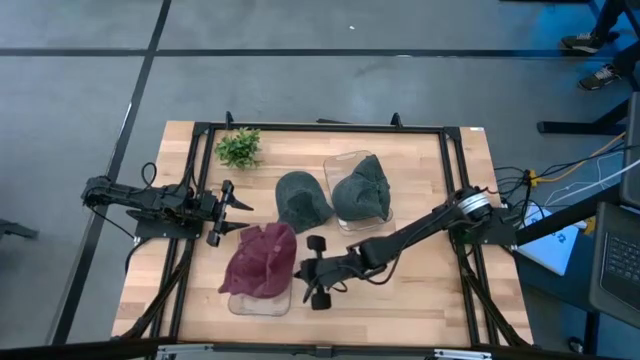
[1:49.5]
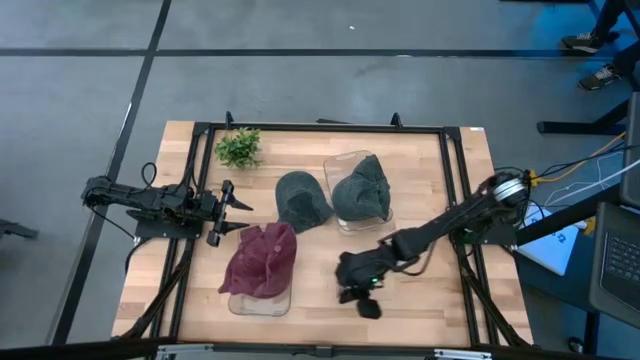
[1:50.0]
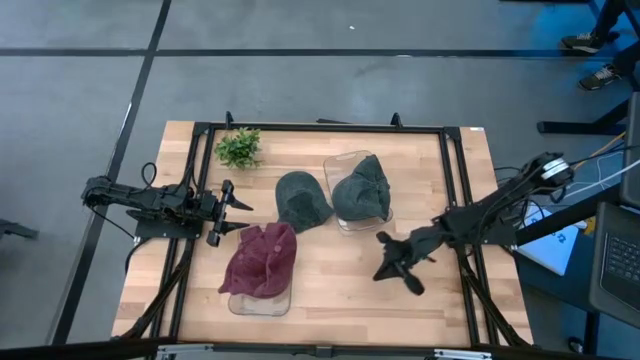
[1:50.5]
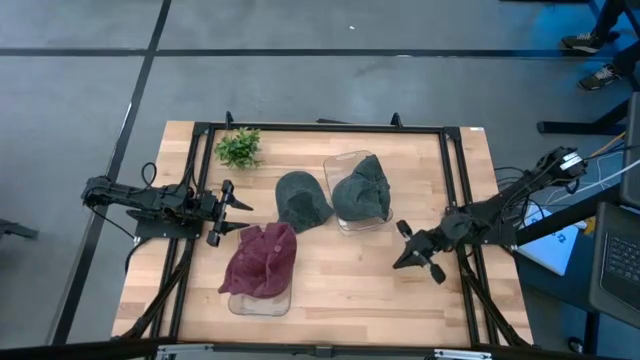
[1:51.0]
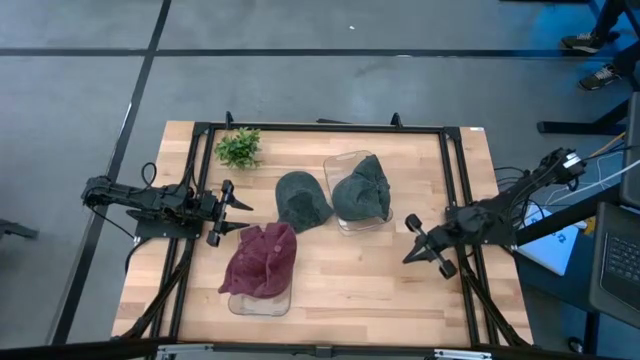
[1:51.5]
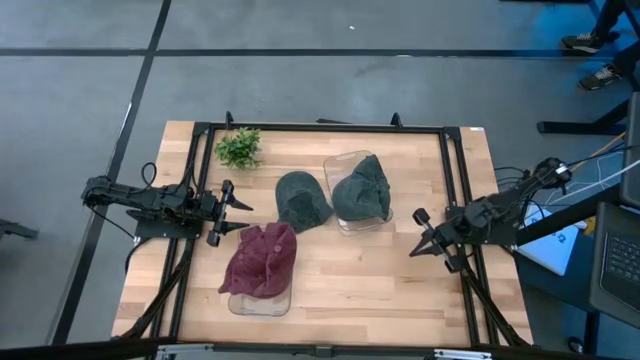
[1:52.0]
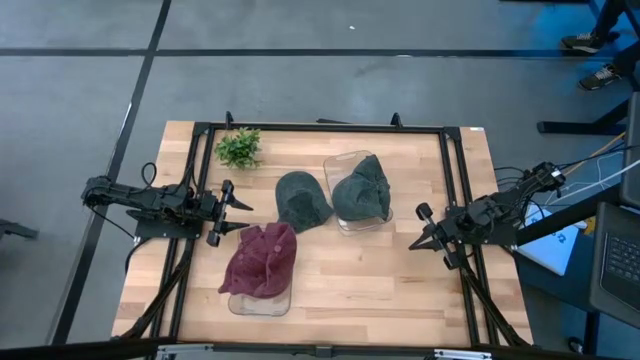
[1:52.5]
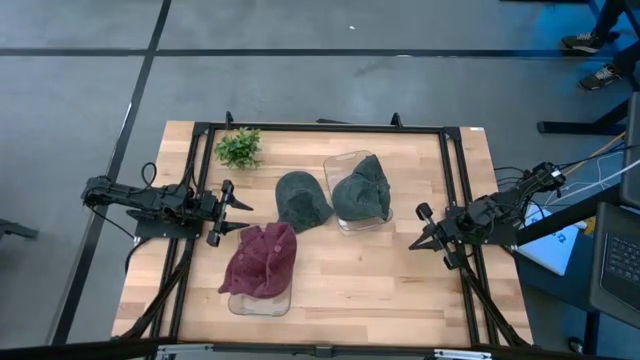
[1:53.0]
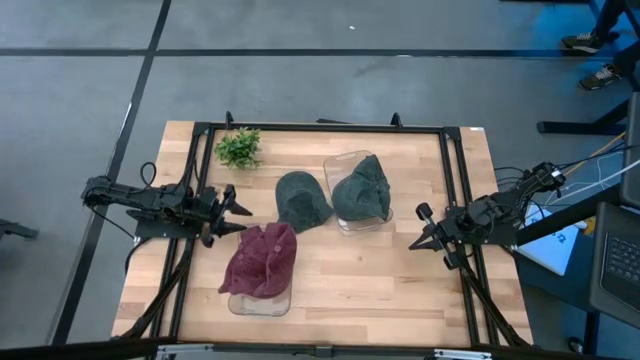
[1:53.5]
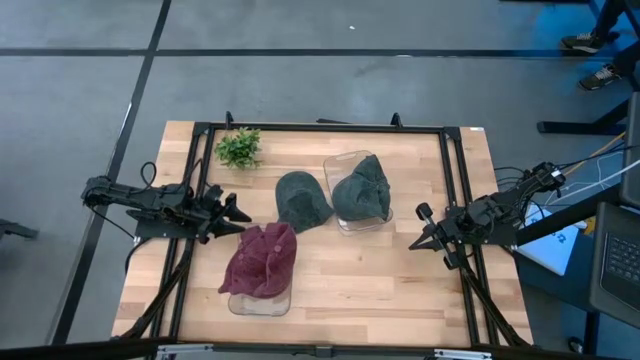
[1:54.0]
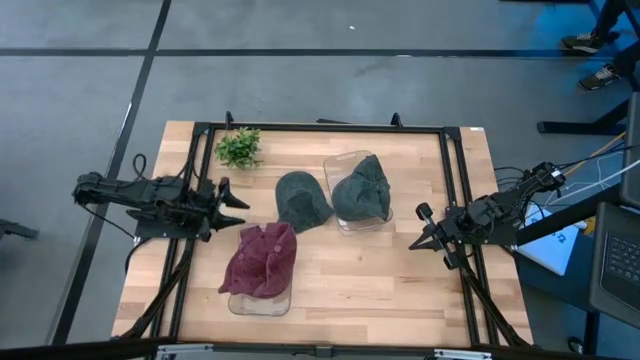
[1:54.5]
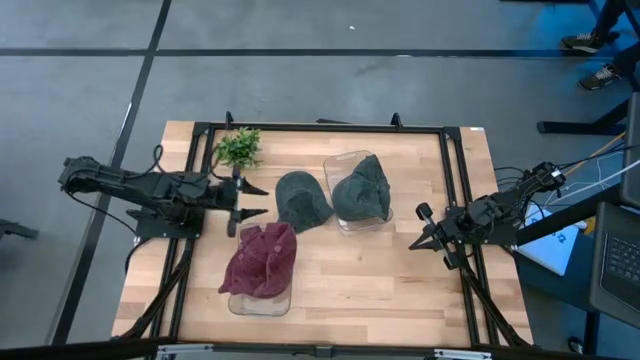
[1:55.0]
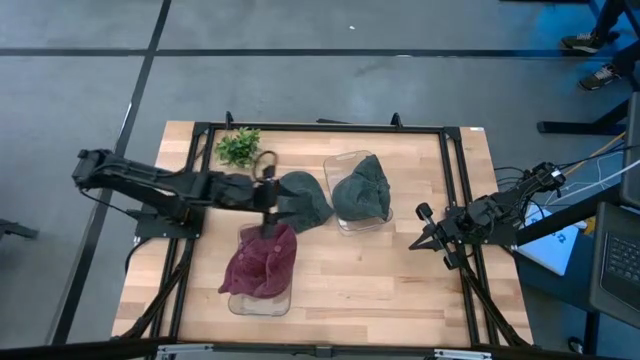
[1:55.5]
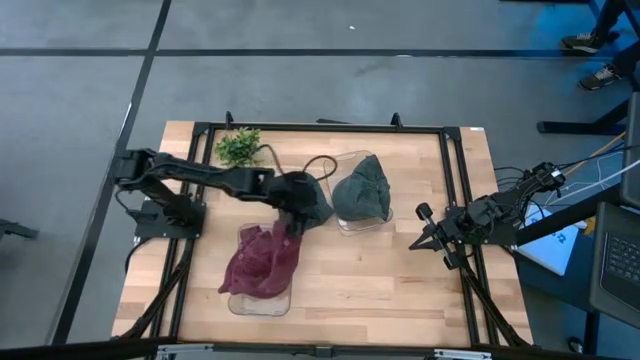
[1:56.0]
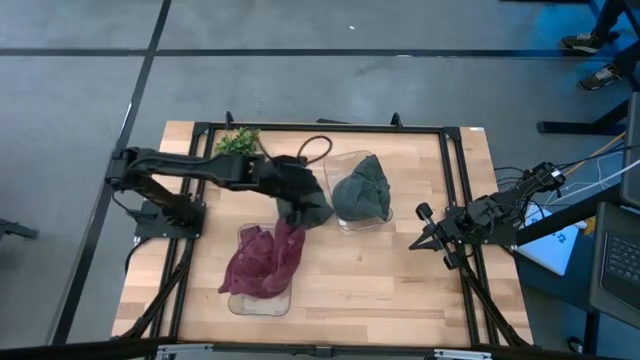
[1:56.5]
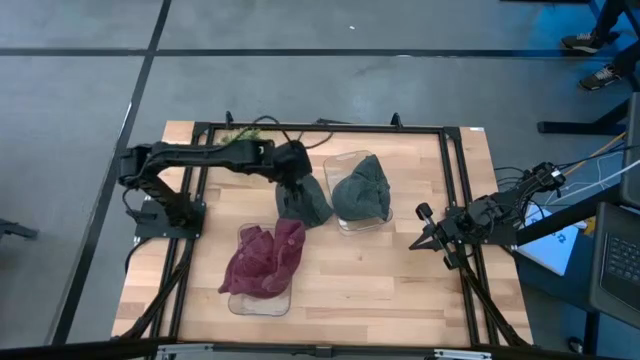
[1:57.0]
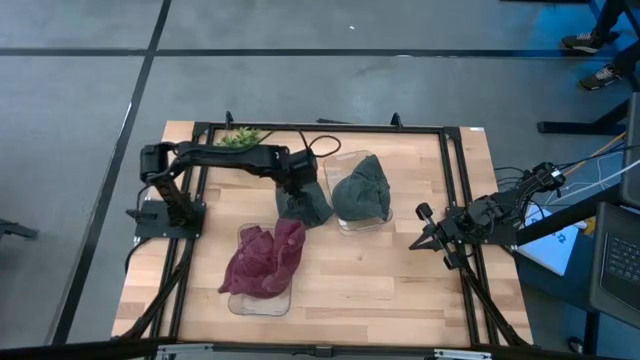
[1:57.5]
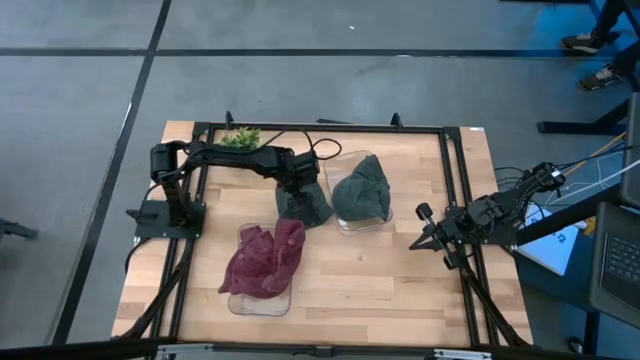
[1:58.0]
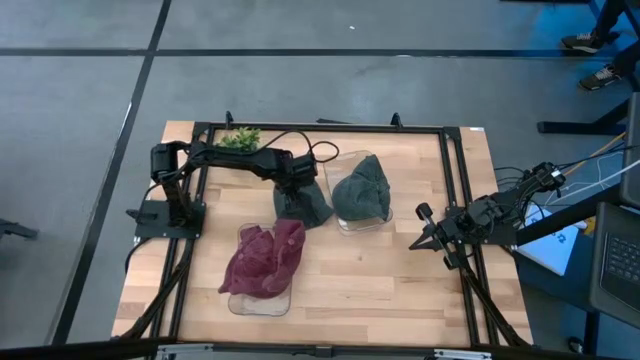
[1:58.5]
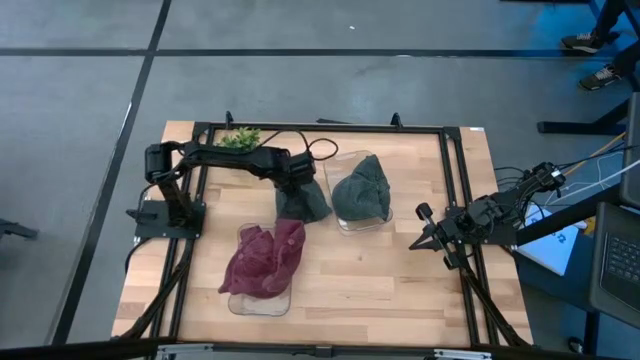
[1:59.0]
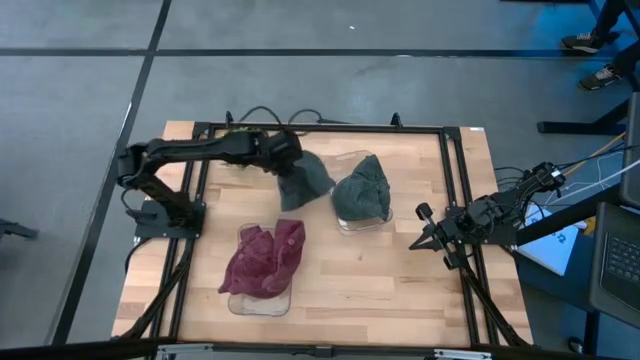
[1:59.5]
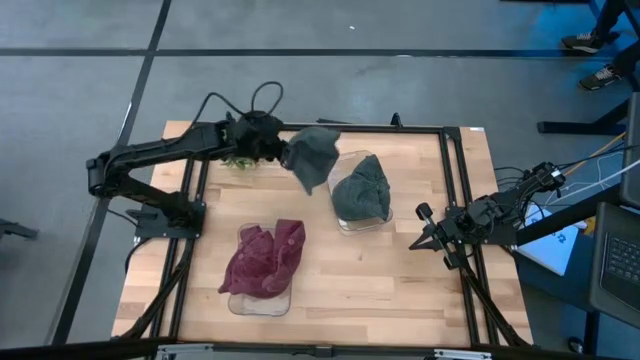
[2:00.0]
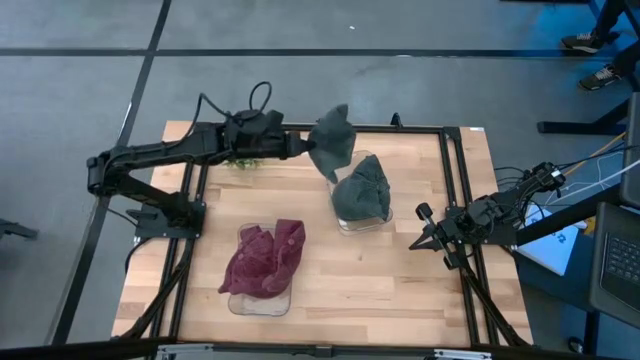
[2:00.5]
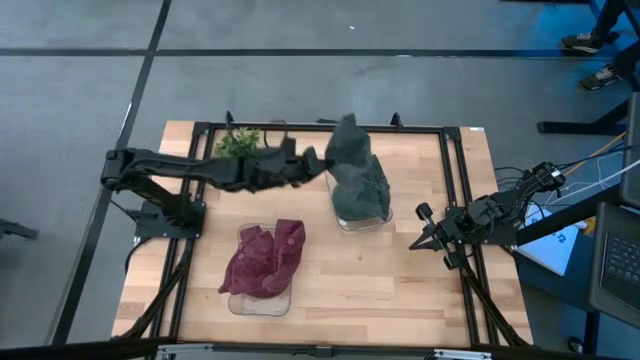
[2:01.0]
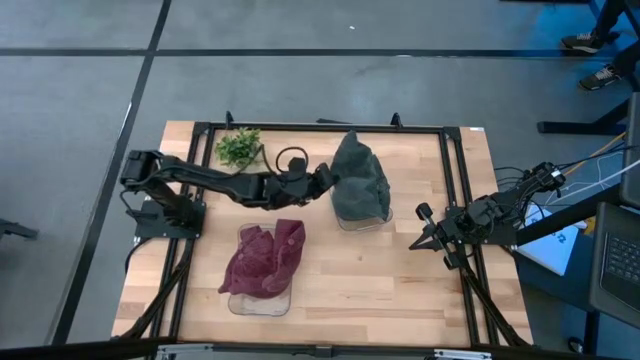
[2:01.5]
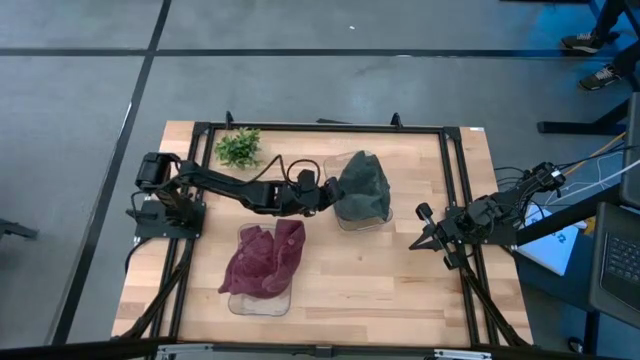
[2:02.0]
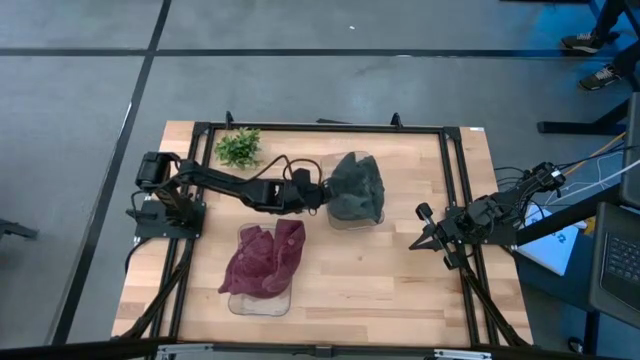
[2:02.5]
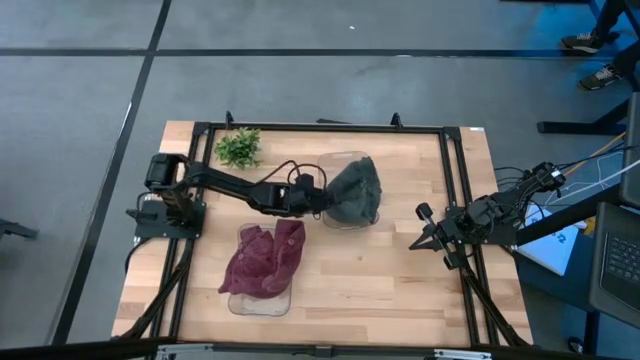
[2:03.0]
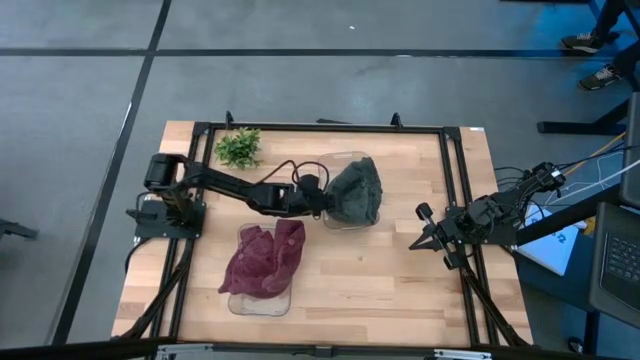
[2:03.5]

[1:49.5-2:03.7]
Task: Pick & Place hat
Put the black cap into the right transparent bin

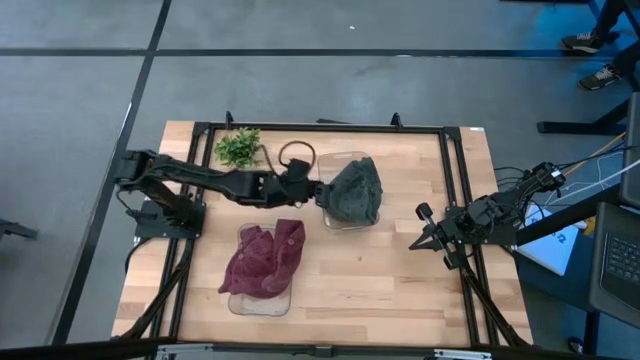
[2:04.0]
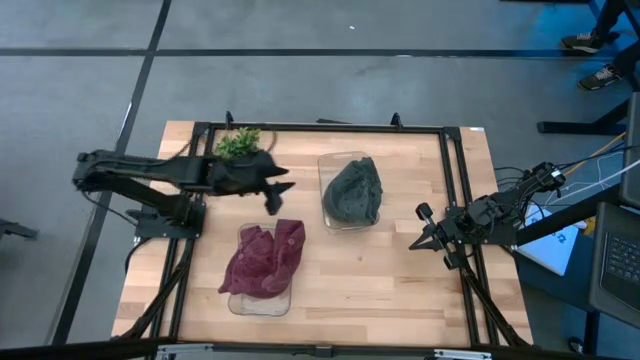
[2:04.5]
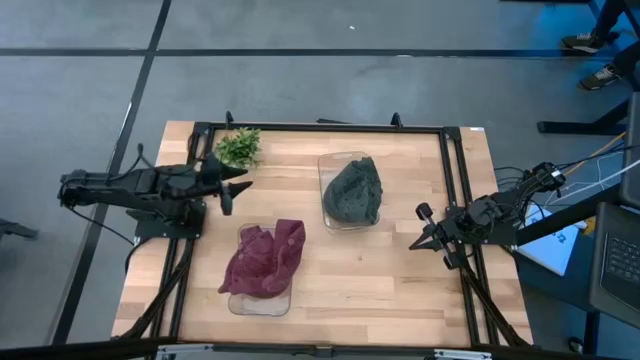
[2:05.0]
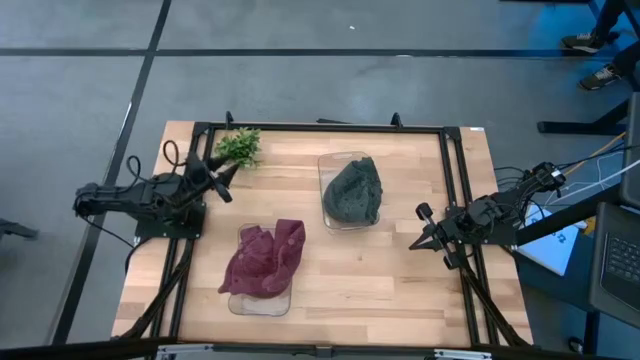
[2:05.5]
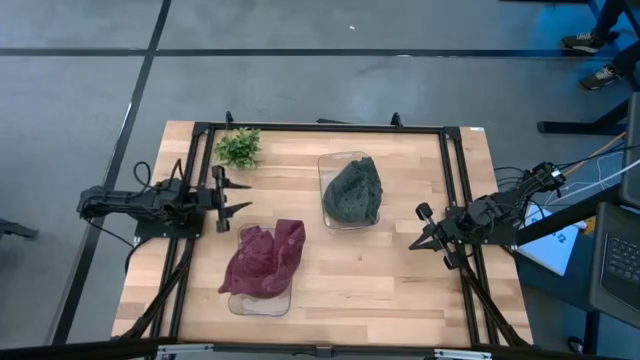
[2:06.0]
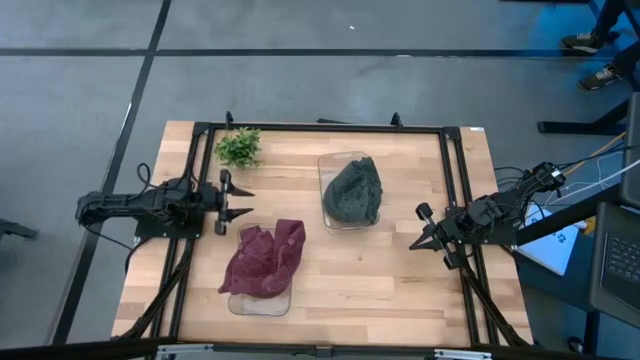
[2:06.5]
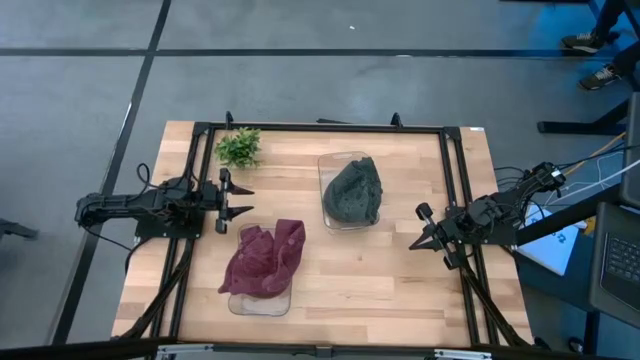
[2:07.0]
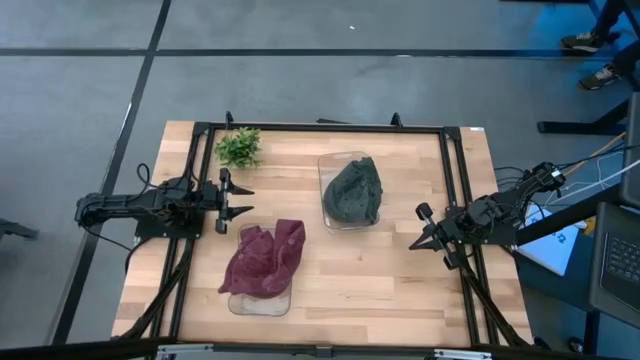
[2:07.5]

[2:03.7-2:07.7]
Return to Home Position

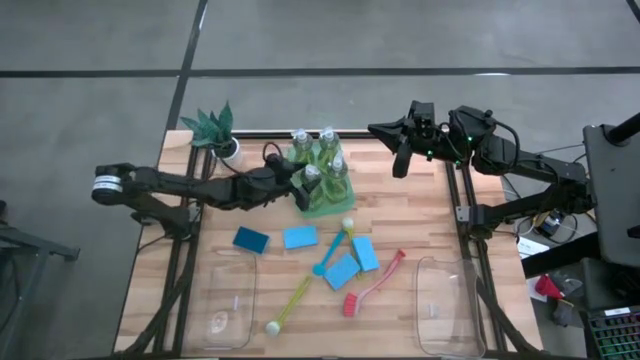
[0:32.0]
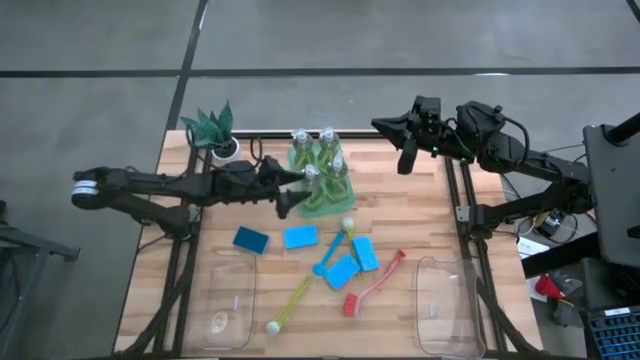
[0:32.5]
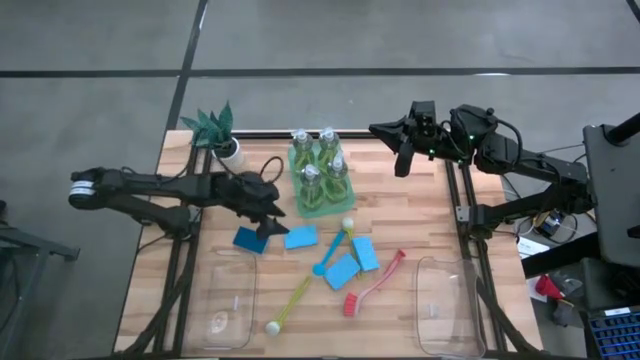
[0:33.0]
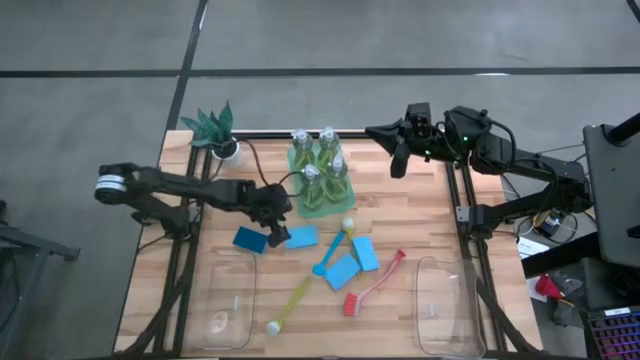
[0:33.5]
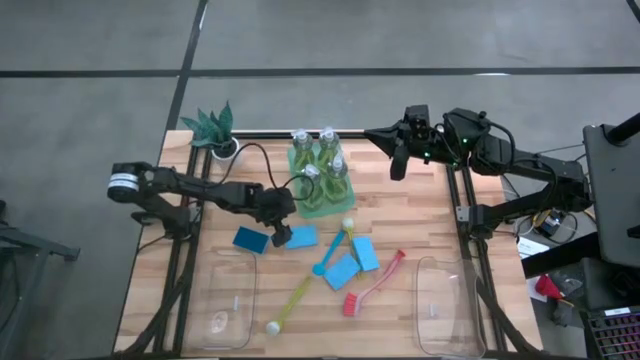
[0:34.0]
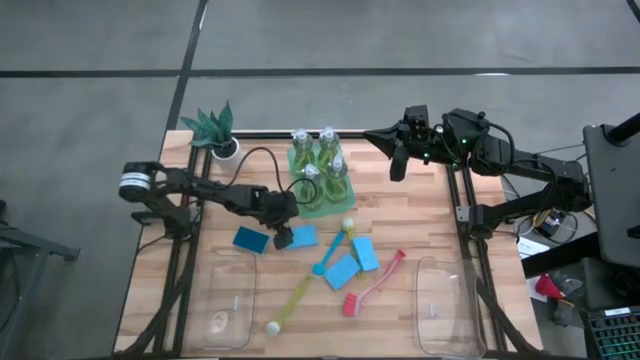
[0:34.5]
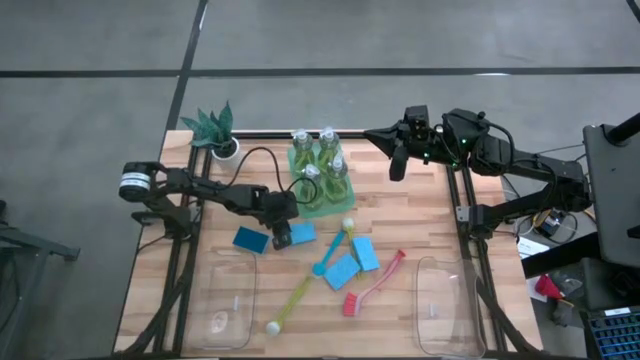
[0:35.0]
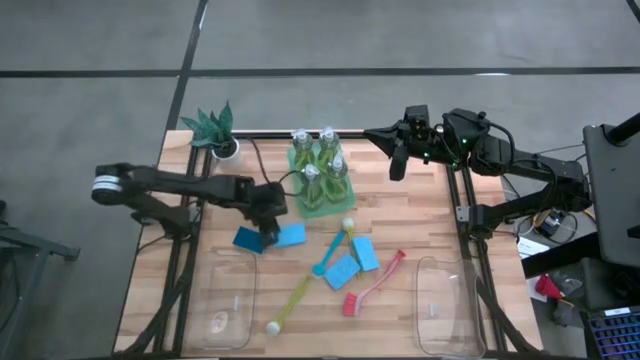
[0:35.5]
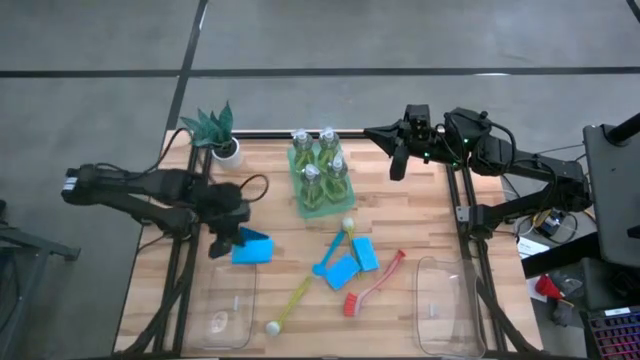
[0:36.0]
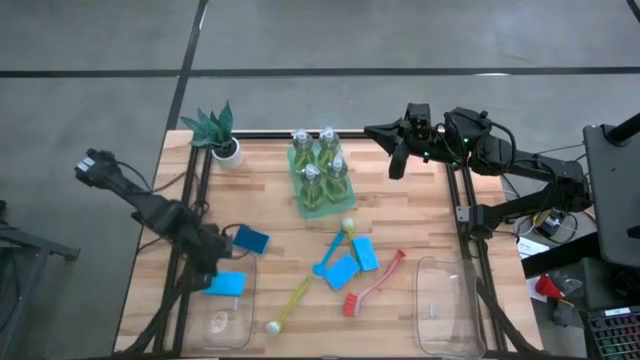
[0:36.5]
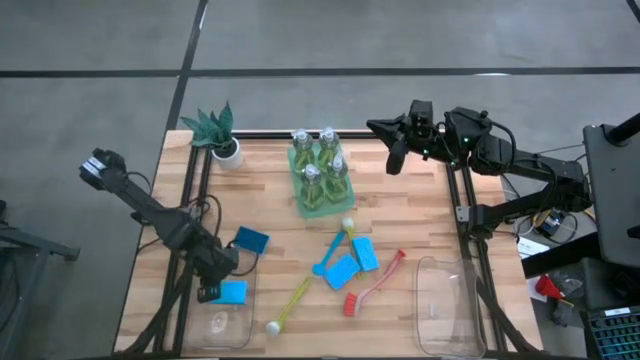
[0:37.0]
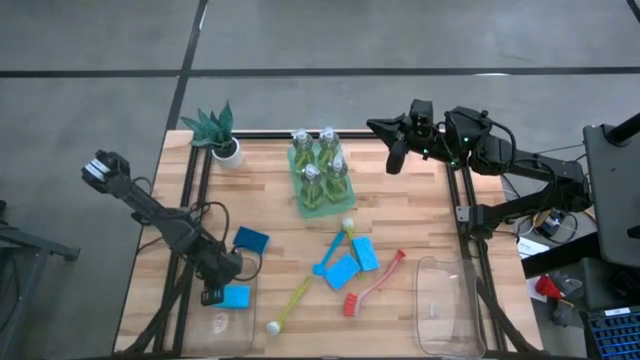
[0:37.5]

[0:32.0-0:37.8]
Task: Pick & Place Kitchen Sink Supplies
Put the blue sponge into the left transparent bin
